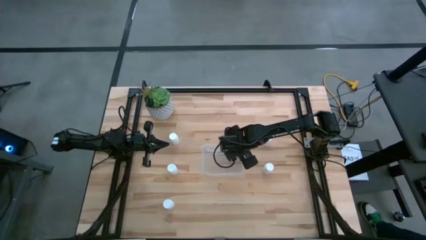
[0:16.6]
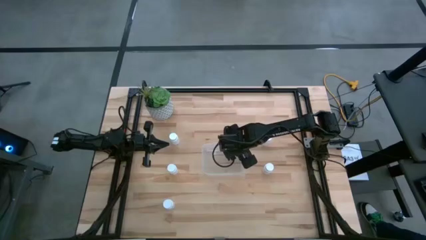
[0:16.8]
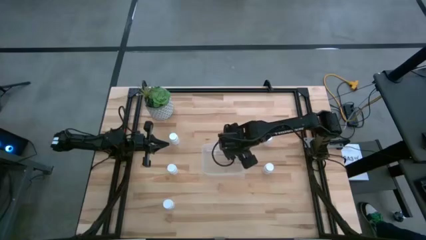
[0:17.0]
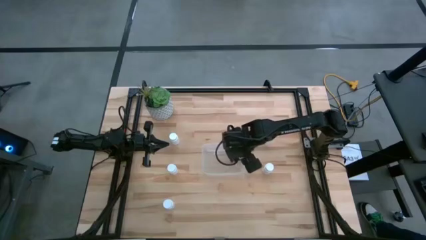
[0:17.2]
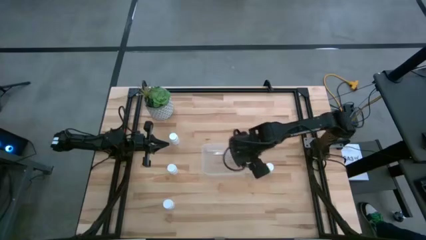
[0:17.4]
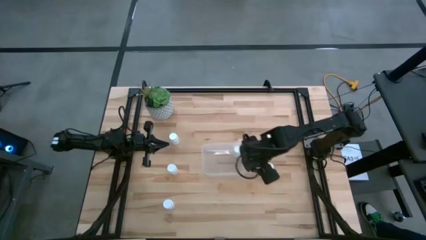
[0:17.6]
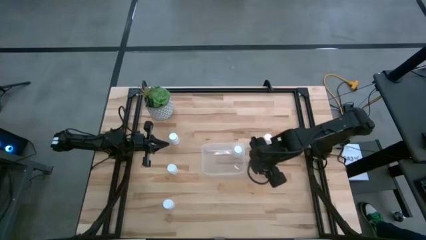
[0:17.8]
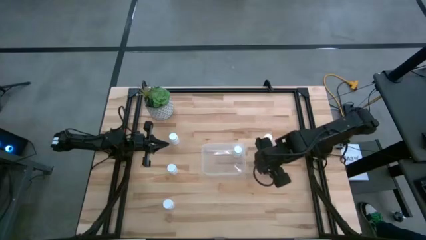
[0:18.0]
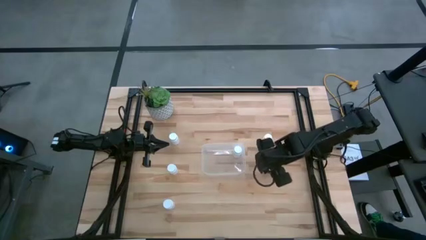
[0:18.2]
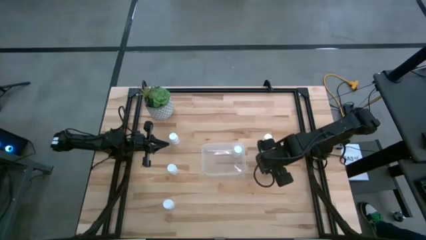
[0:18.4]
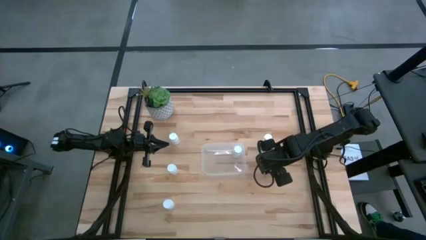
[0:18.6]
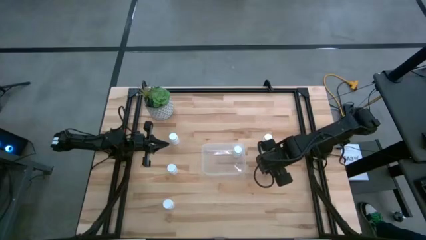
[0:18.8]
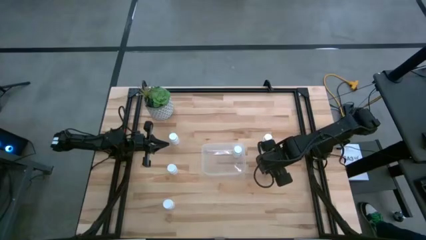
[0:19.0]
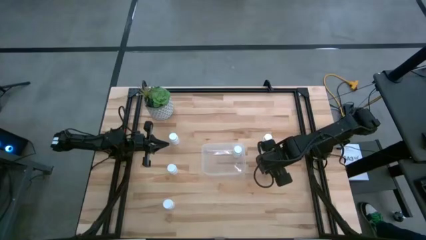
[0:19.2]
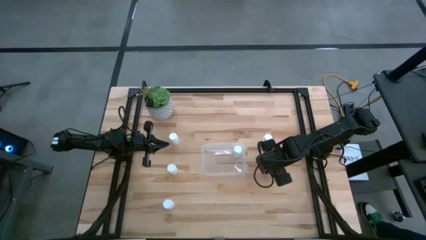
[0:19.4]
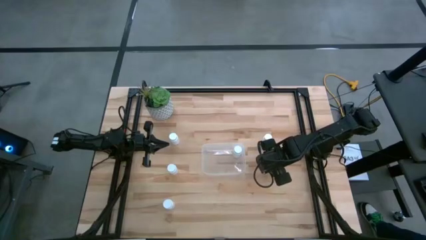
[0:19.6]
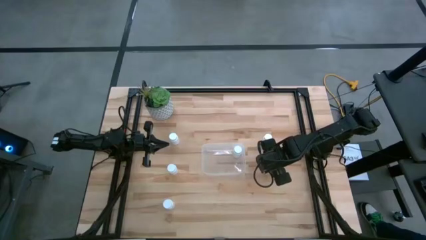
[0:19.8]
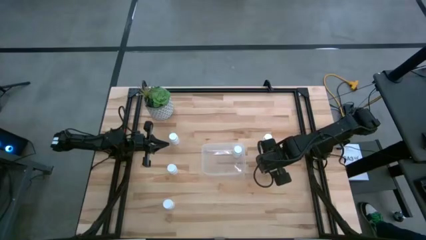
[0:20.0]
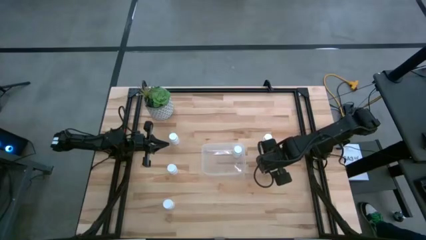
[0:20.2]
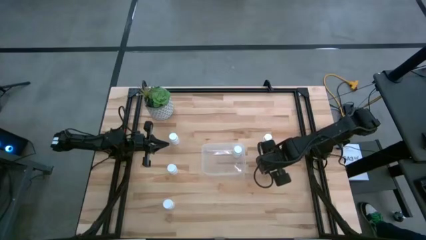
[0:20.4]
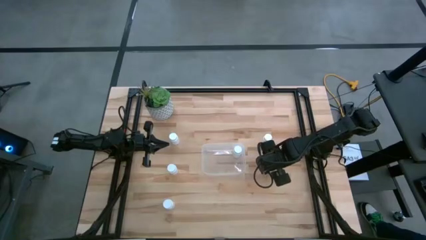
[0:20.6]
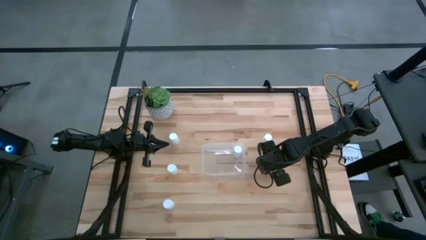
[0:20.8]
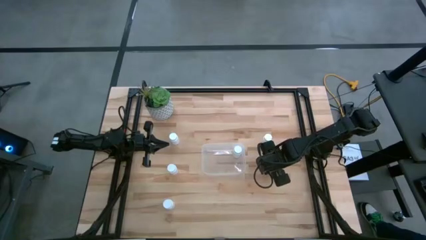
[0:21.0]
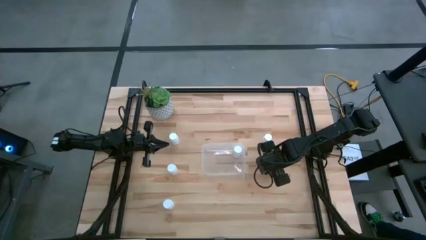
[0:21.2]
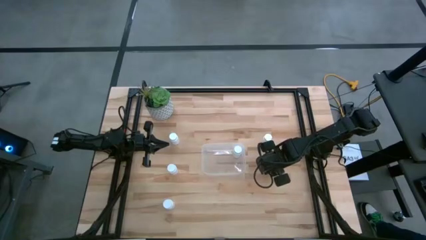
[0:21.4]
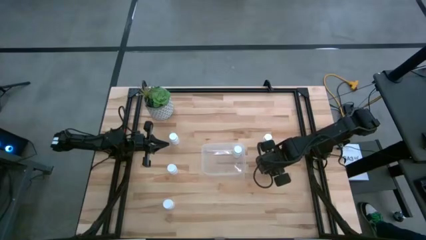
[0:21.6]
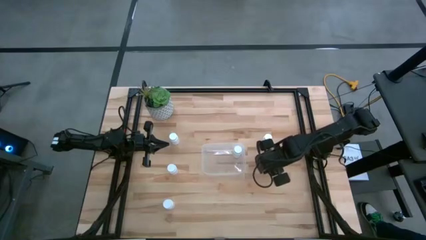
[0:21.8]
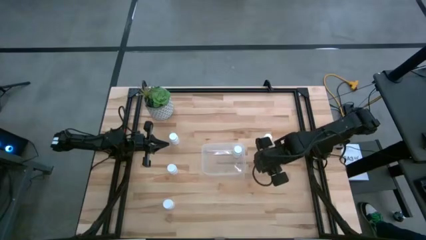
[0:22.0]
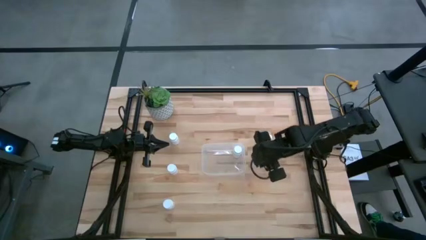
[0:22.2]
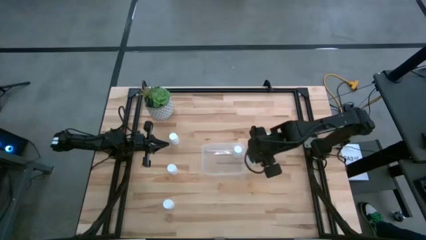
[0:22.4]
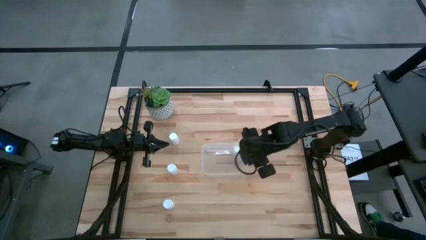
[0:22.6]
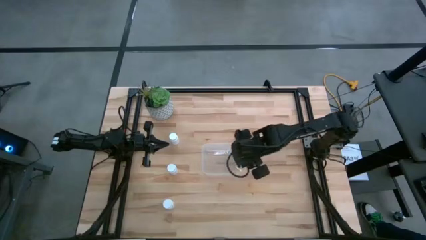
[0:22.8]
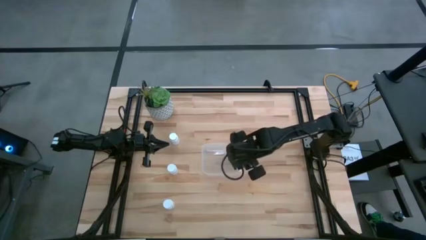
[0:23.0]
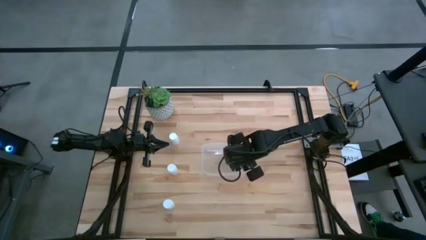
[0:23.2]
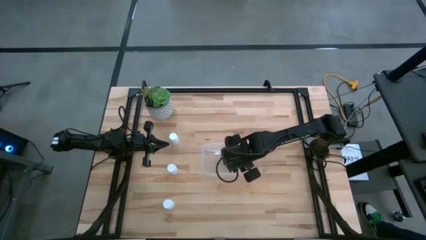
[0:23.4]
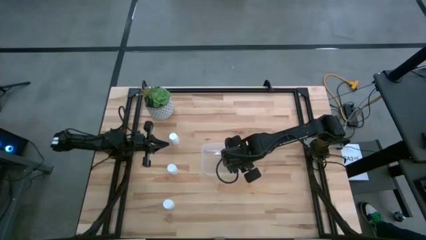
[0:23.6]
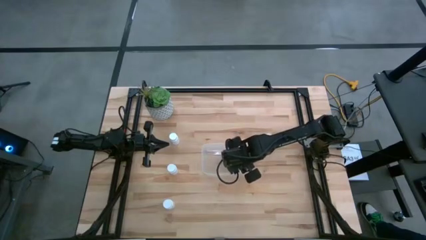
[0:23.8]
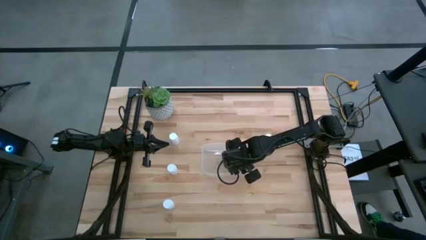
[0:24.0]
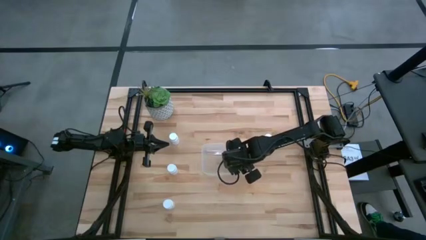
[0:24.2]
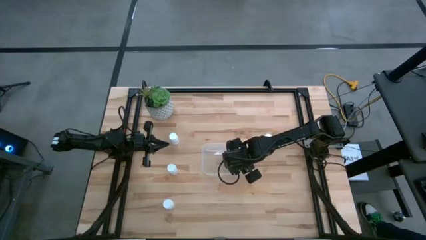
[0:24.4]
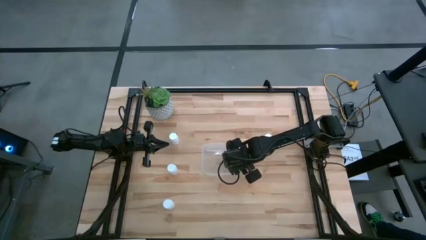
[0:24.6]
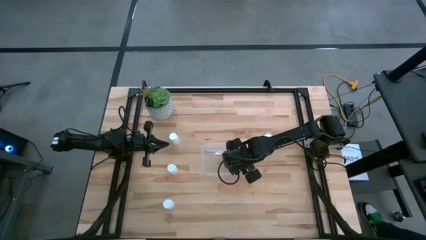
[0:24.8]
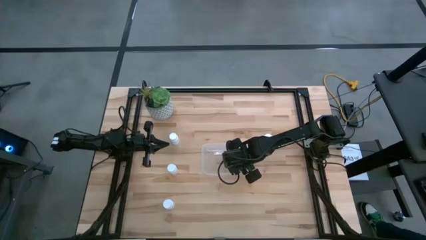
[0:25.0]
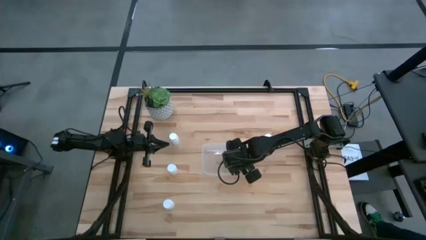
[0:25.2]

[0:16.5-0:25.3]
Task: Pick and place pill bottles into a basket
Put the white pill bottle into the transparent bin

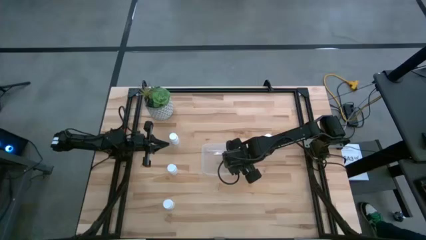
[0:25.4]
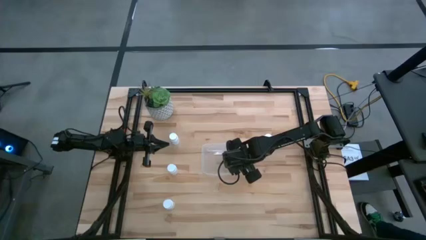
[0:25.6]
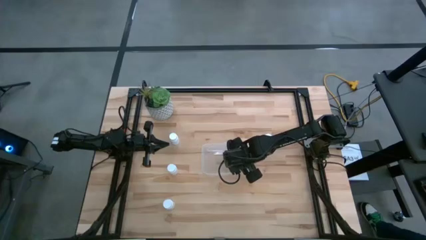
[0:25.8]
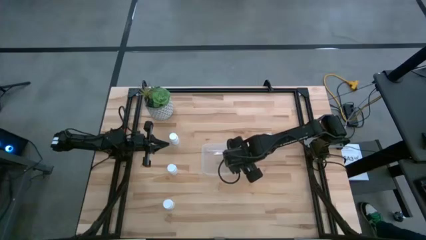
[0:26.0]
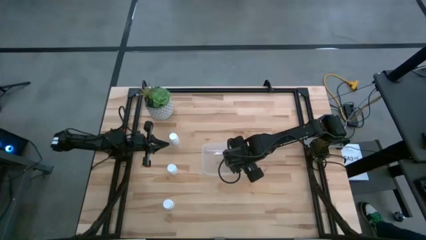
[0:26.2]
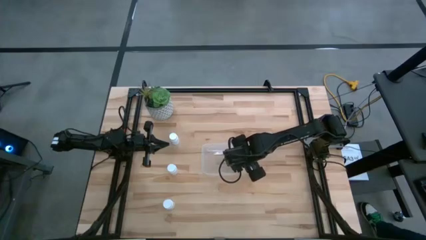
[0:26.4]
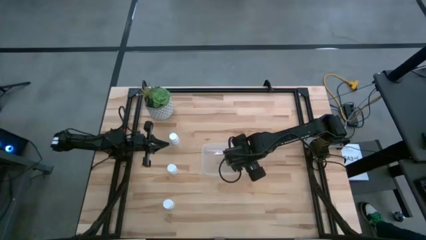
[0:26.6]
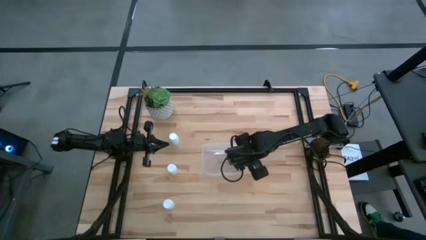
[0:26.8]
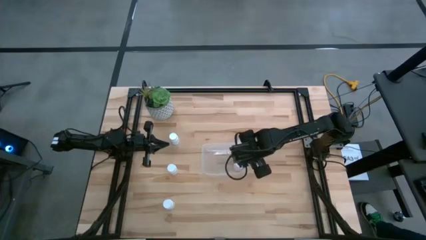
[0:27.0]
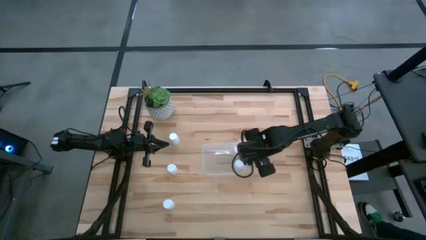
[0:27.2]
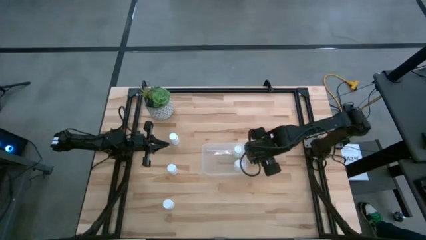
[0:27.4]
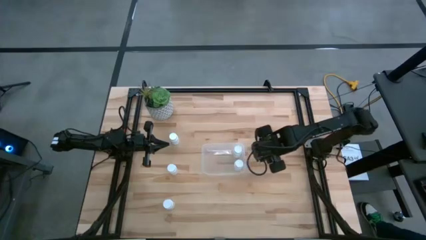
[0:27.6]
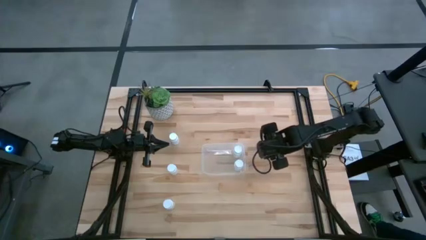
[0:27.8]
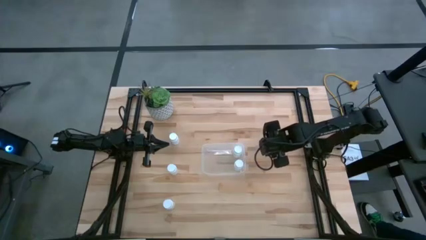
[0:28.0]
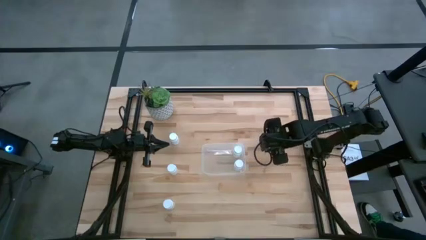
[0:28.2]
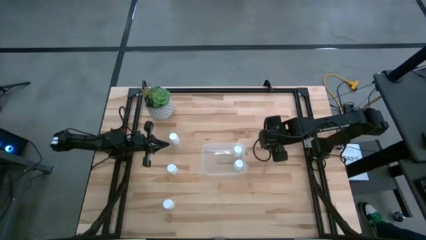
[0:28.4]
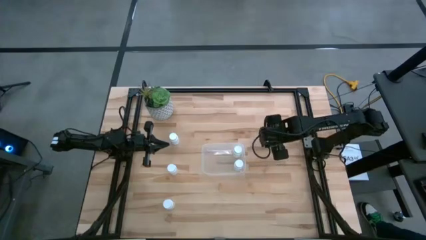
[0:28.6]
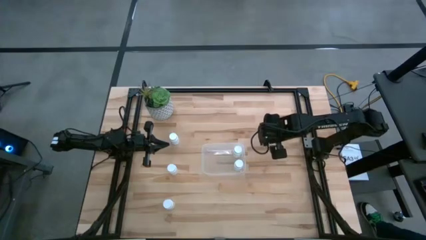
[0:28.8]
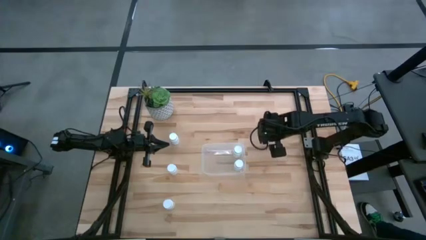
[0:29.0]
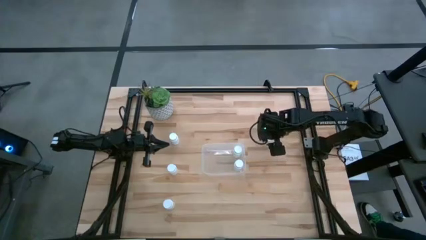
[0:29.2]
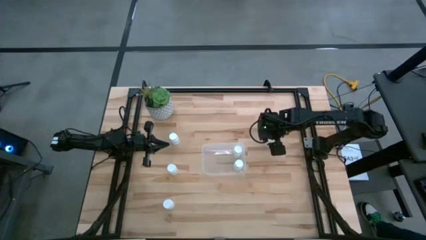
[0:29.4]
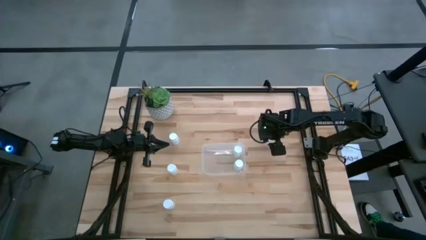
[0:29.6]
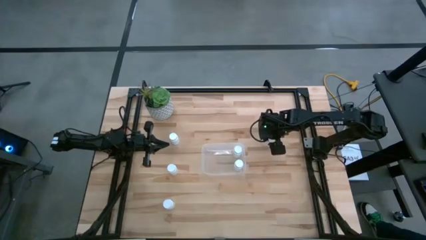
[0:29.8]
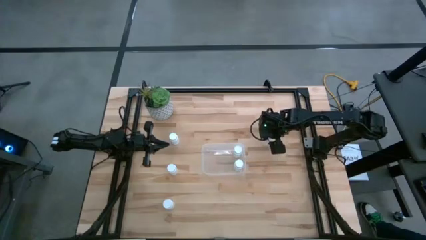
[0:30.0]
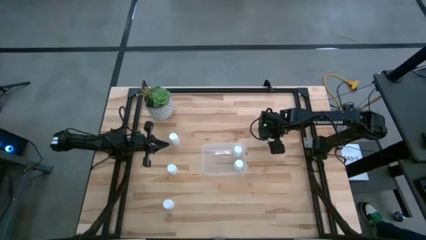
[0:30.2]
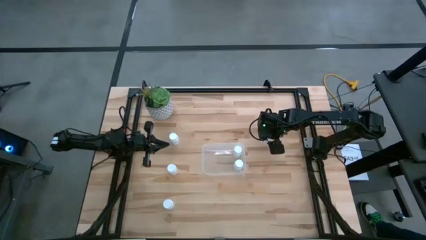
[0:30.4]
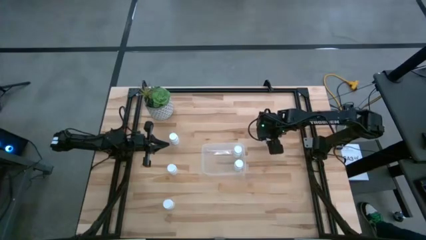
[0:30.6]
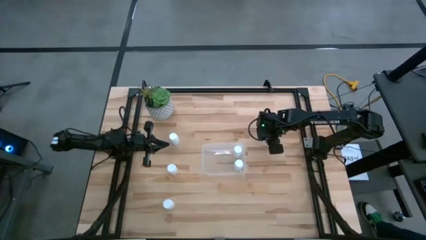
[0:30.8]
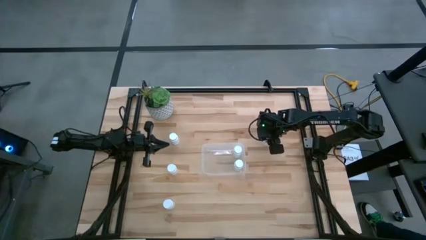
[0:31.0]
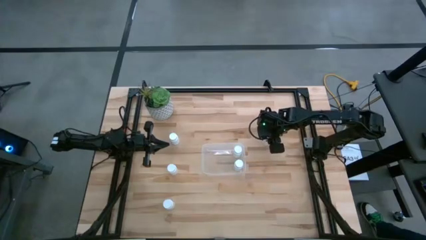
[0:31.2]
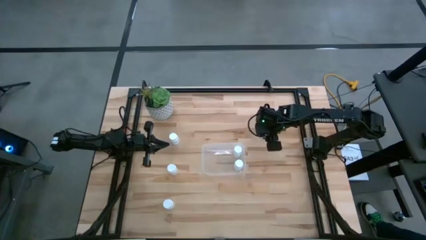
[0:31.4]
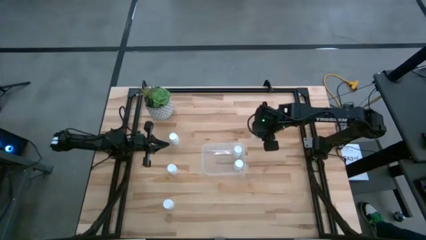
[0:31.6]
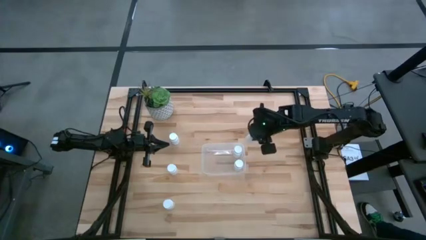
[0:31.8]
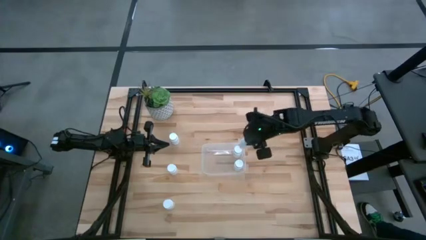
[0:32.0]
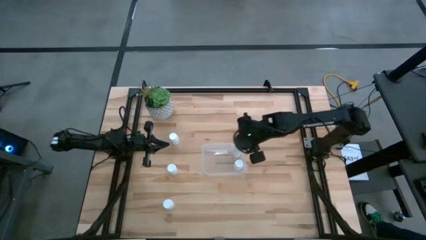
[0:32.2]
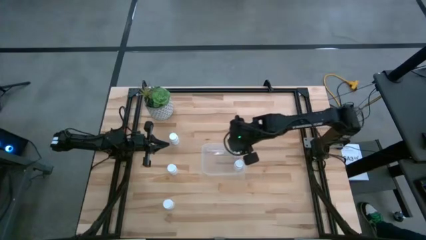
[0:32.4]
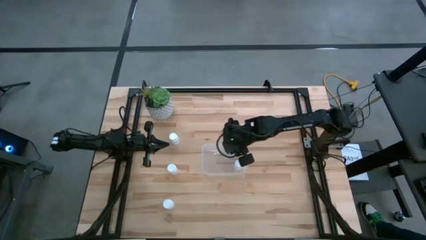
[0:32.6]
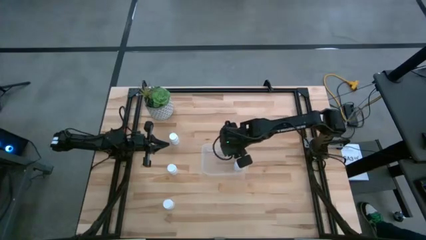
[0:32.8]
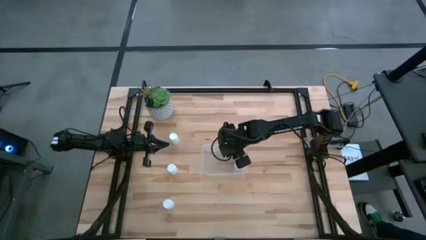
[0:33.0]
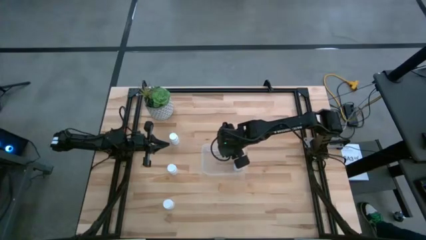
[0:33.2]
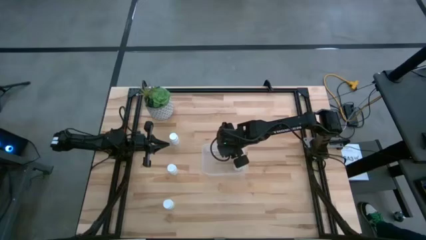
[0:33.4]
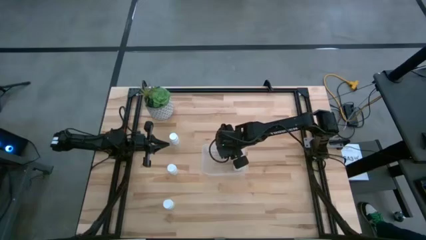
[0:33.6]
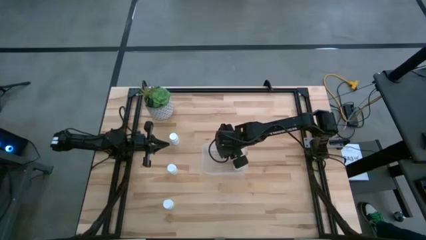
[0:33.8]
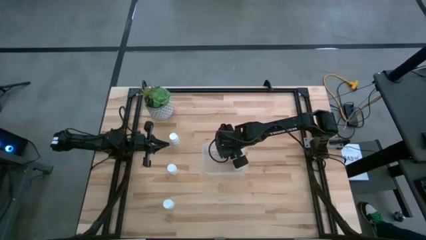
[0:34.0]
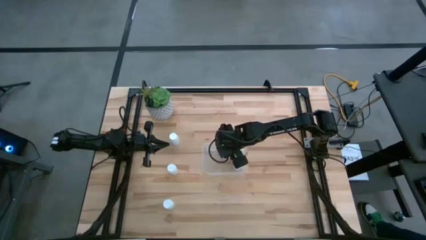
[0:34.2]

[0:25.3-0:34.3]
Put the white pill bottle into the transparent bin
